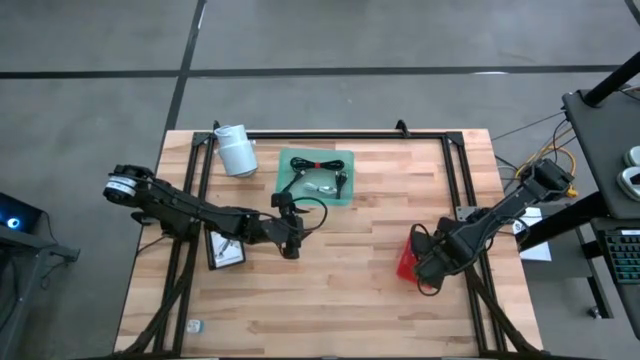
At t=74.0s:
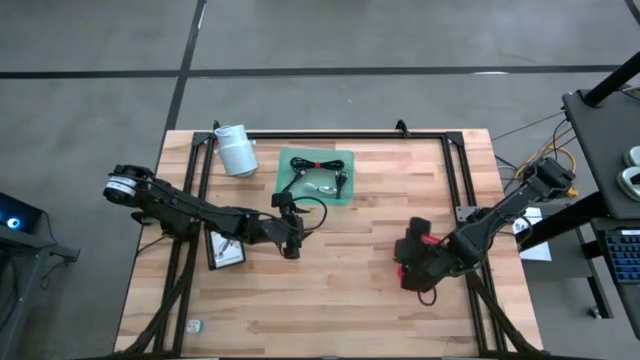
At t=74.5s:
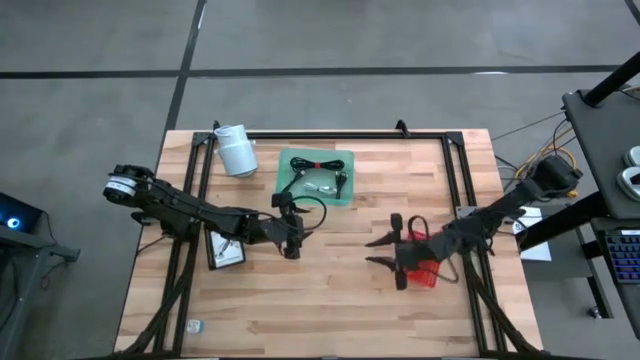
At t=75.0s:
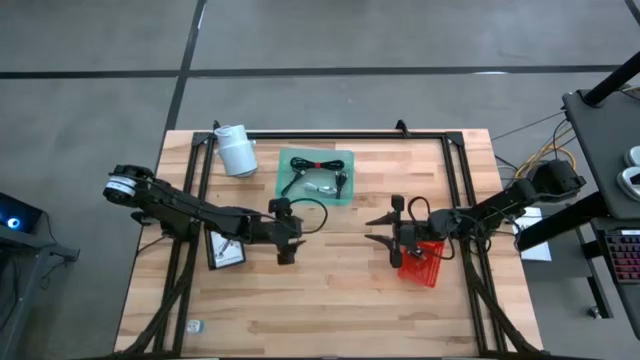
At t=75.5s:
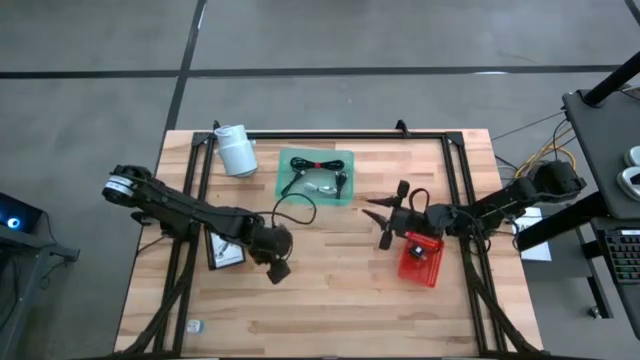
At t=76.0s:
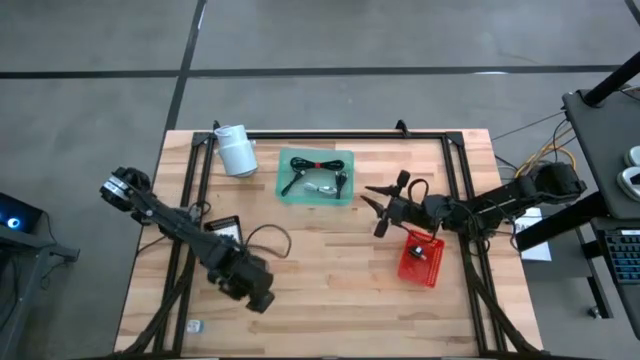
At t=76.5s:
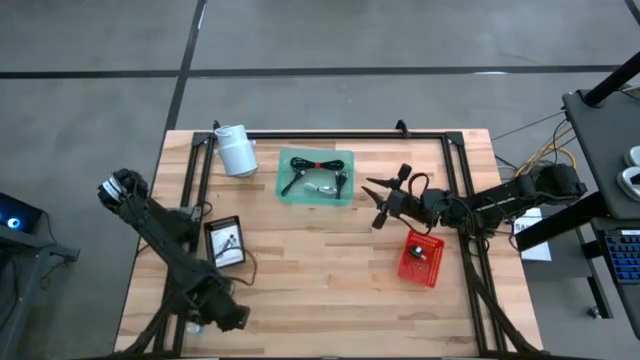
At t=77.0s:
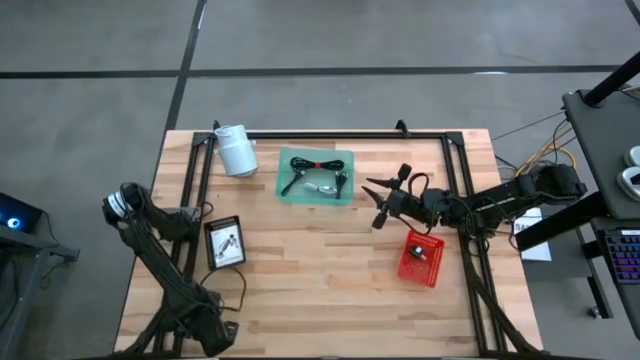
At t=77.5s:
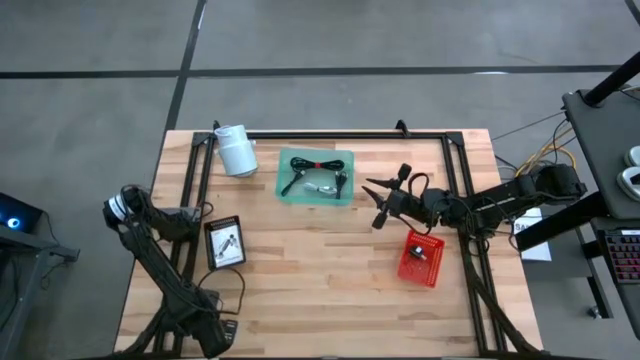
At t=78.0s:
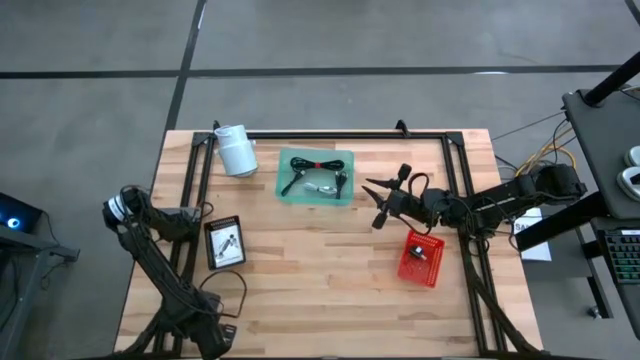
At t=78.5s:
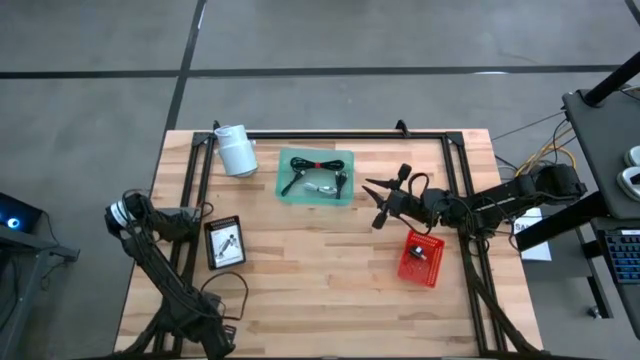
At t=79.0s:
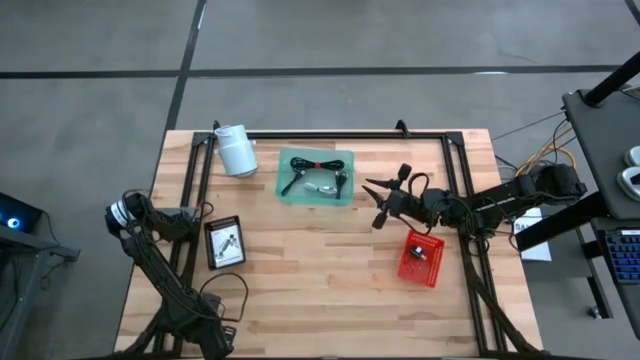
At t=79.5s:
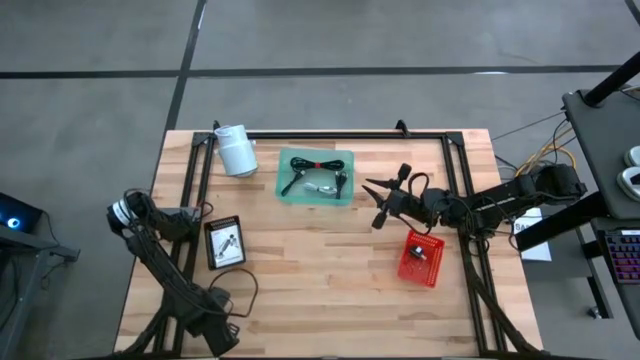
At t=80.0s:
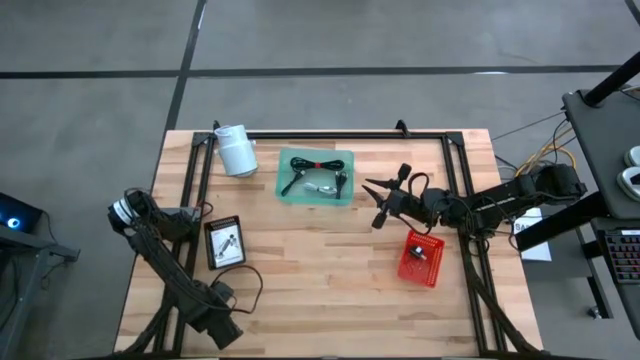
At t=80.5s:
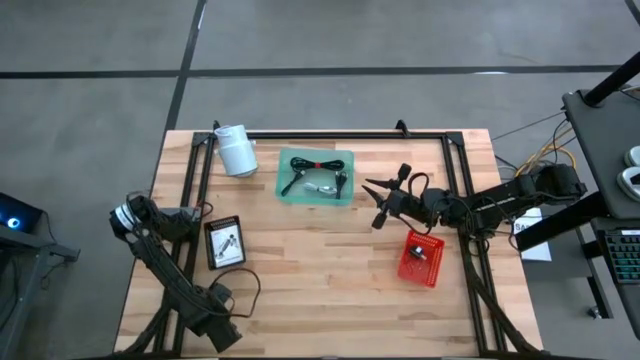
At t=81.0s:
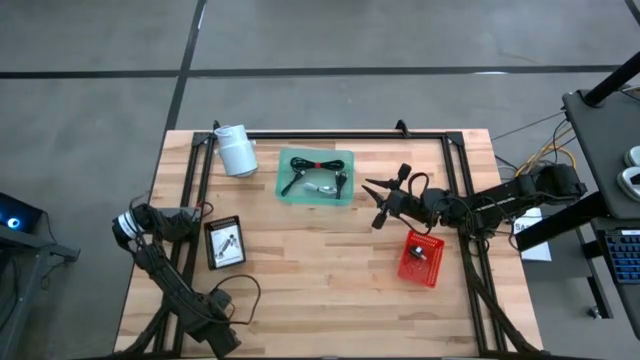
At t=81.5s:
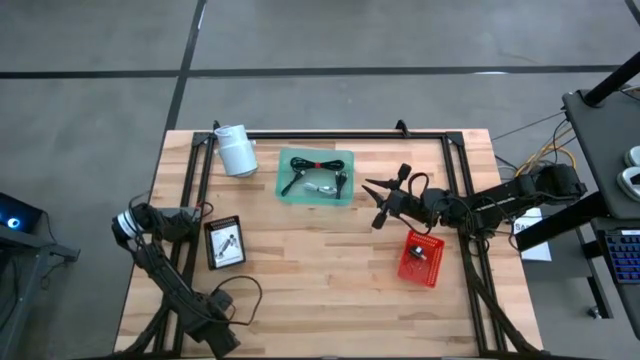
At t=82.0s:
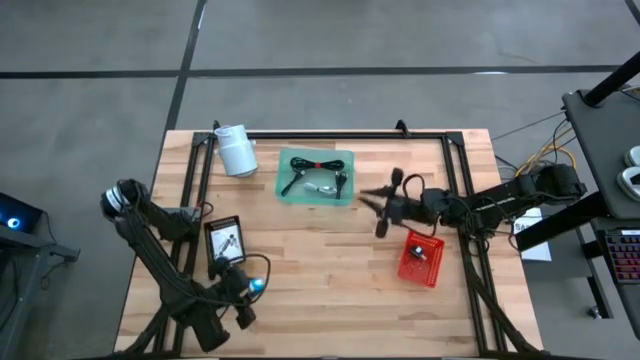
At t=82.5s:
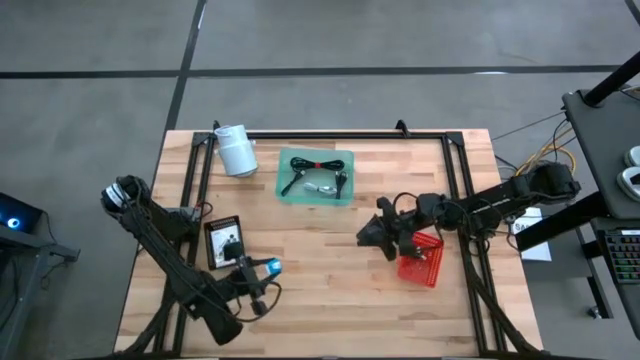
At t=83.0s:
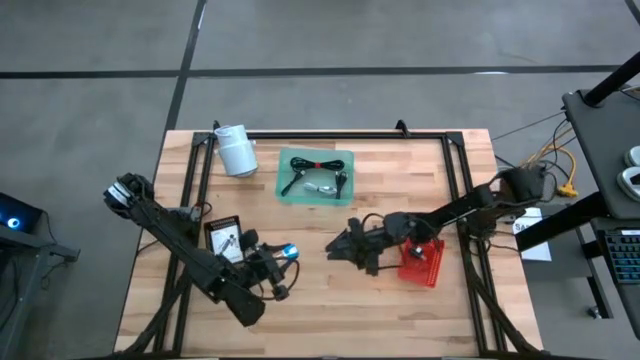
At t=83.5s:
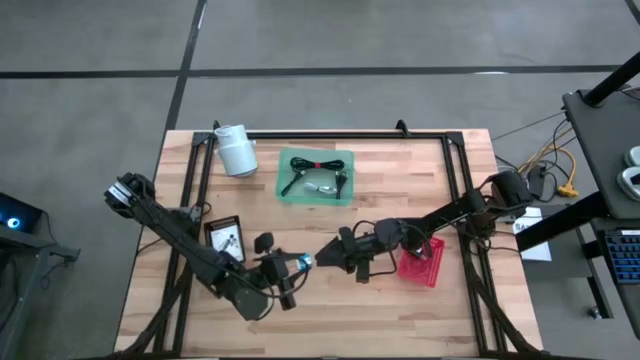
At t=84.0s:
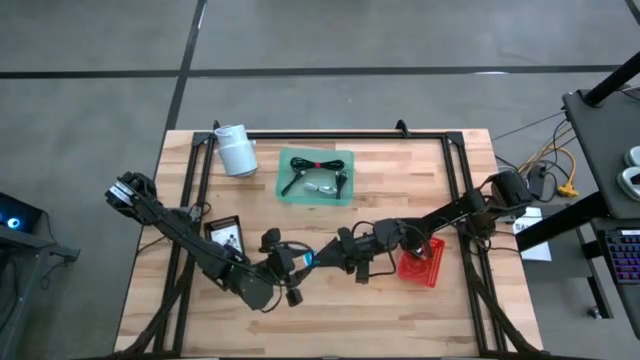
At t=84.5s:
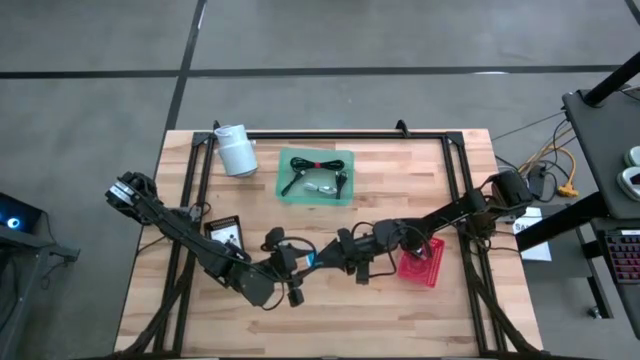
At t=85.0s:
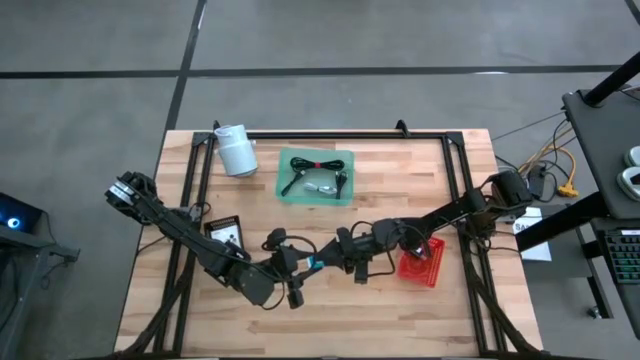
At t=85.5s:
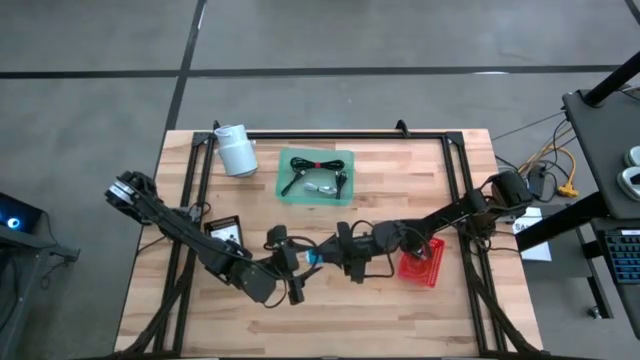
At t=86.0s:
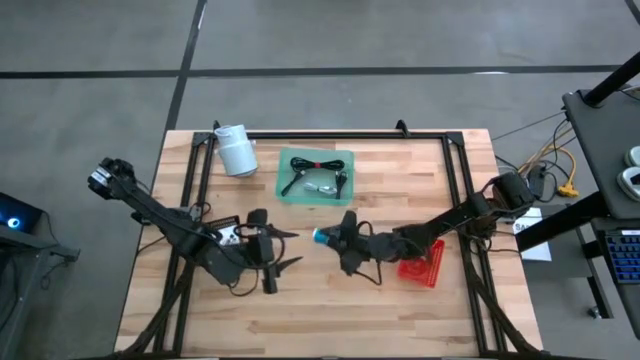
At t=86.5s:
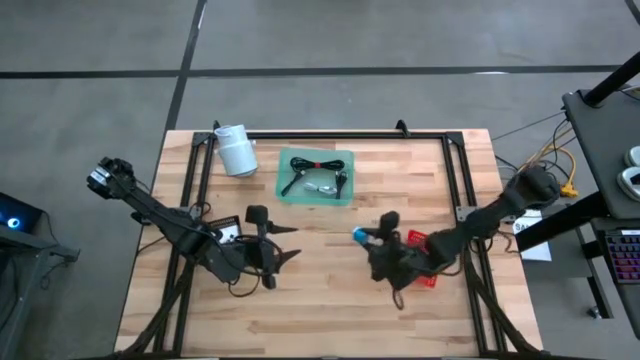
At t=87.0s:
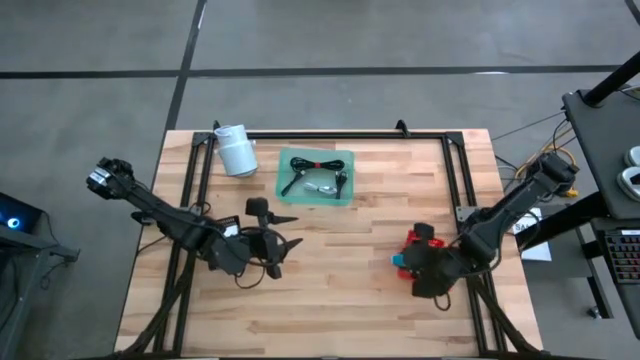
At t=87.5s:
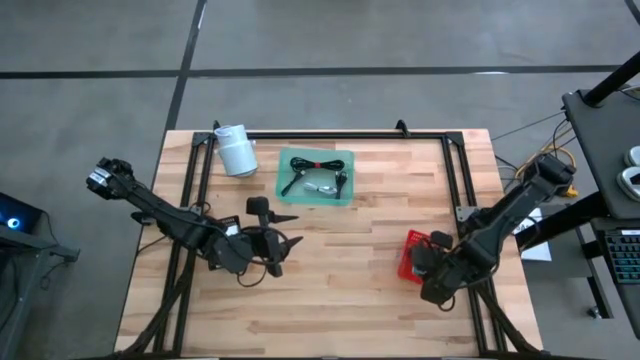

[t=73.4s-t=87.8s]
Task: Pick and place items into bin
Put the blue charger adapter into the red bin

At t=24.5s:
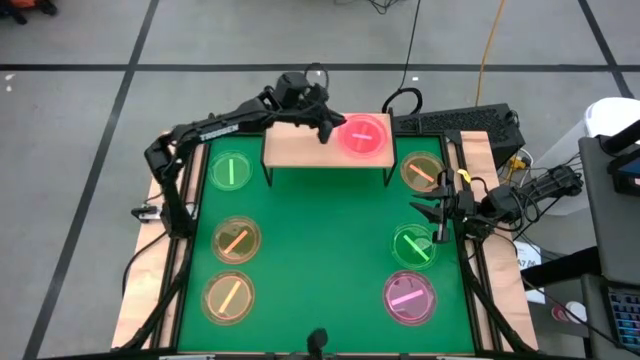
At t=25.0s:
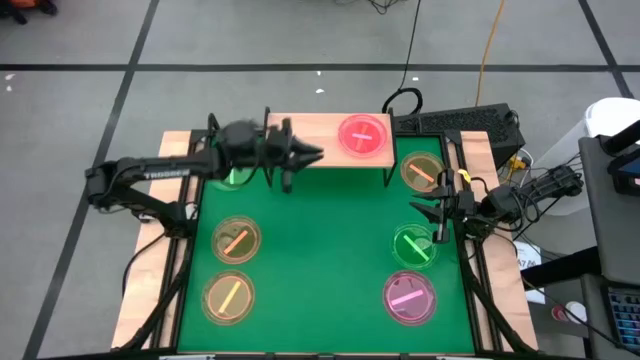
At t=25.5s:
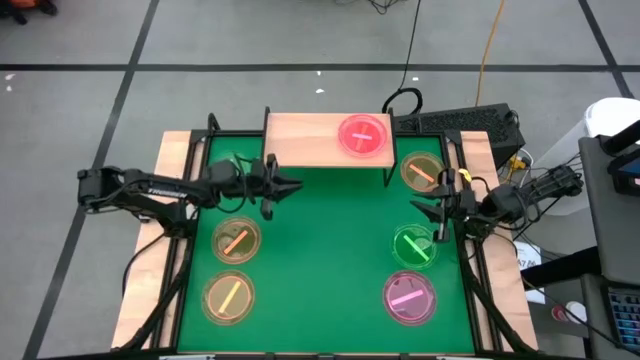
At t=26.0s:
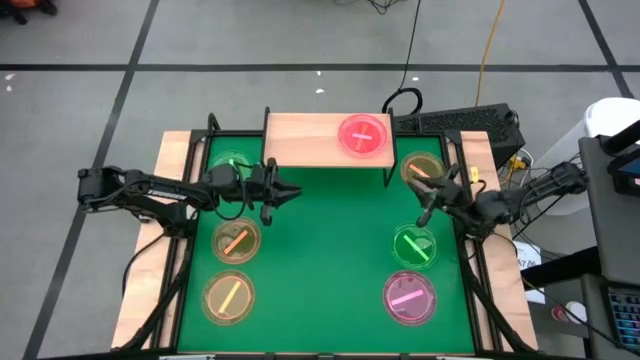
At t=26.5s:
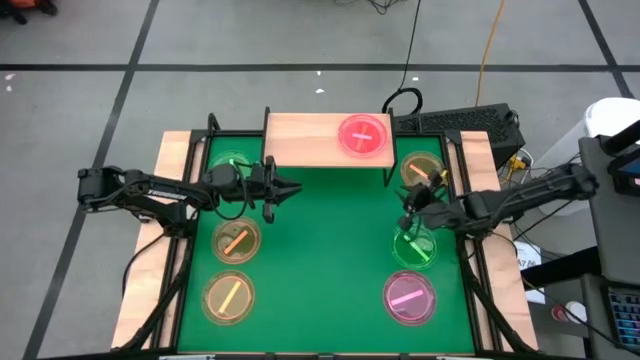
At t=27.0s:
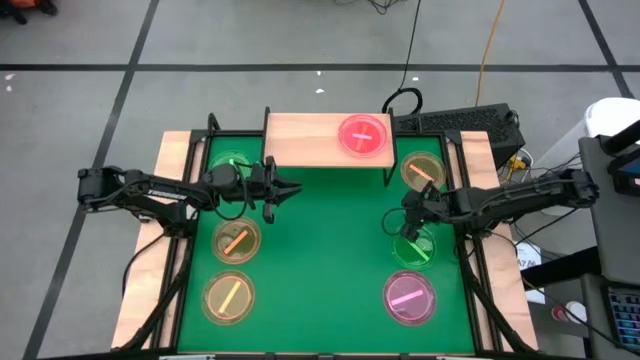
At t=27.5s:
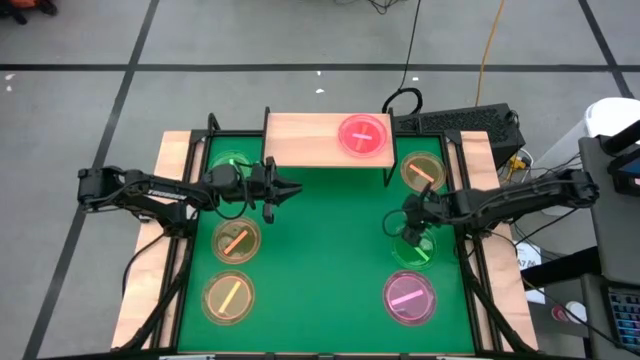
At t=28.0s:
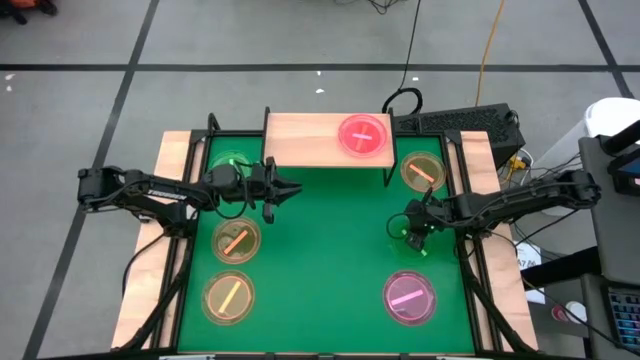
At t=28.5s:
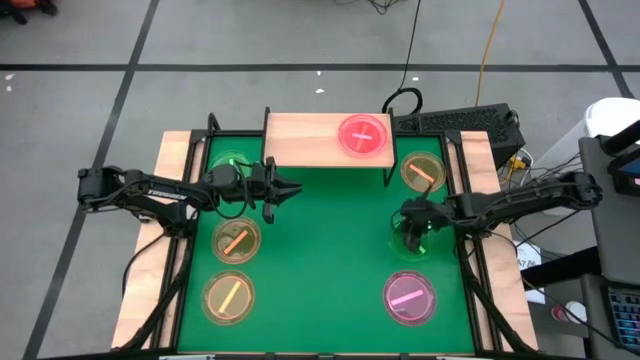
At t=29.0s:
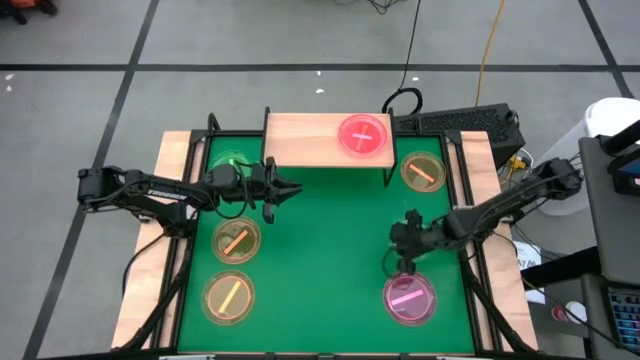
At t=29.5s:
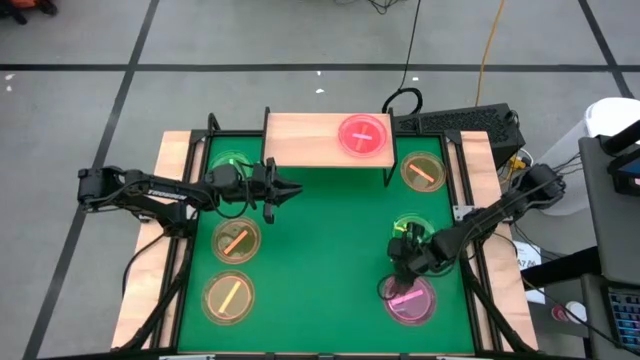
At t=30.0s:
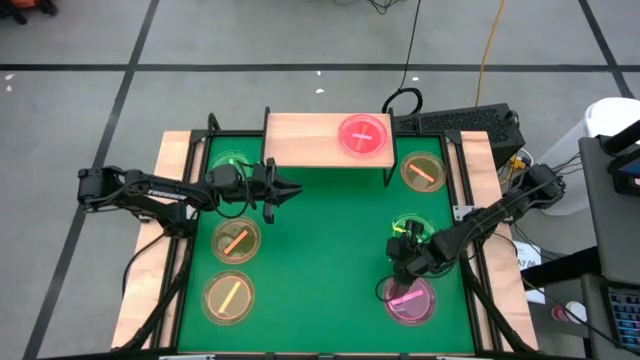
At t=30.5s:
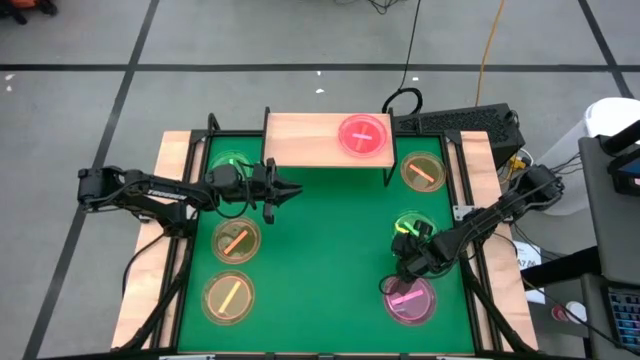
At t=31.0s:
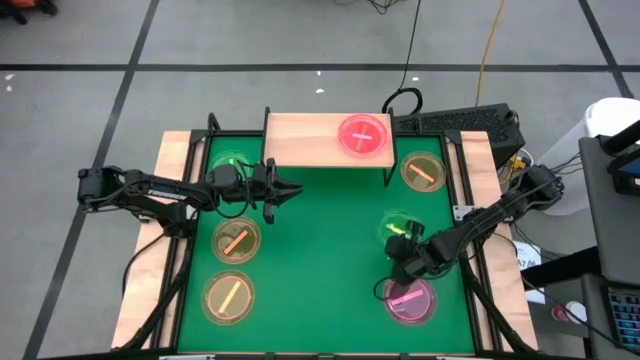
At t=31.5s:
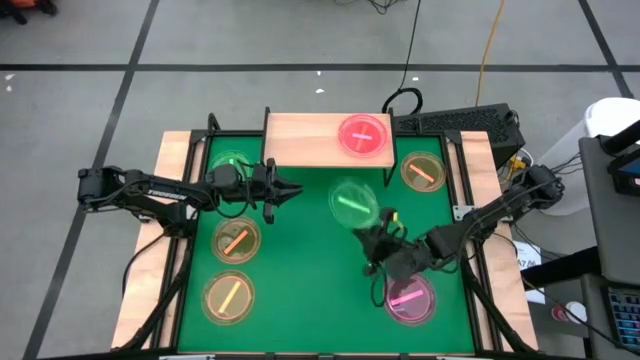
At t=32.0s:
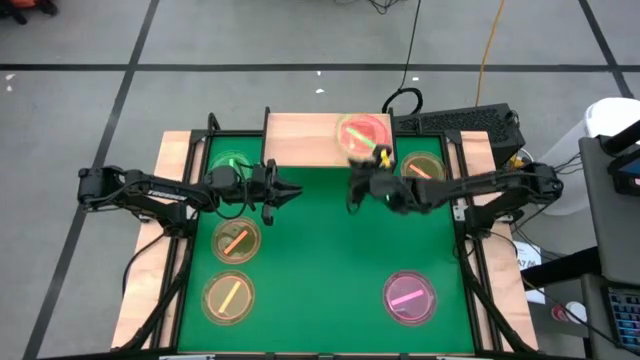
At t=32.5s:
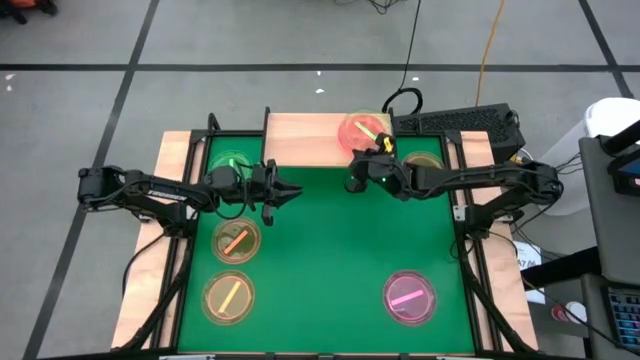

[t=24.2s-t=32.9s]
Task: Place and stack plates onto a shelf
Stack the green plate on top of the pink plate on the shelf
